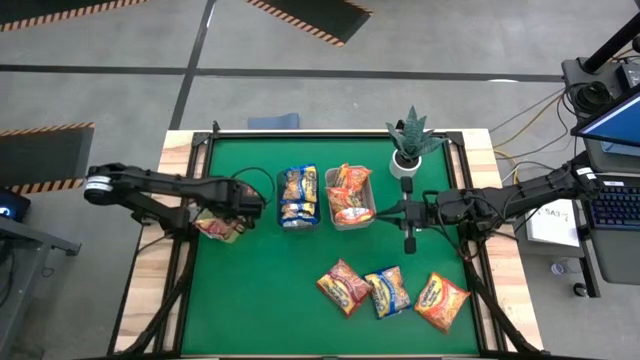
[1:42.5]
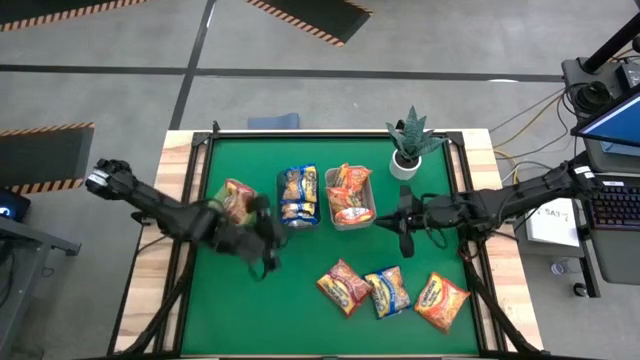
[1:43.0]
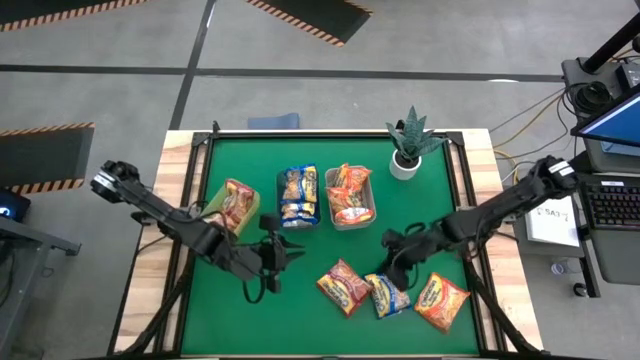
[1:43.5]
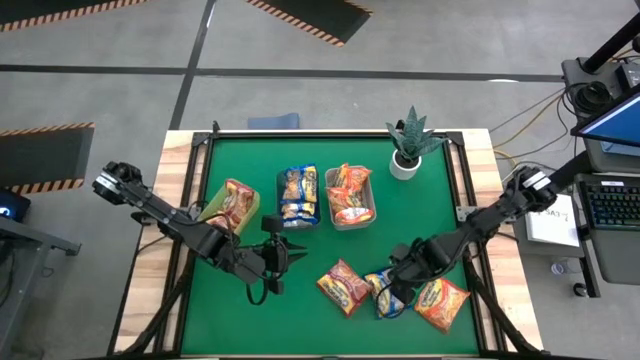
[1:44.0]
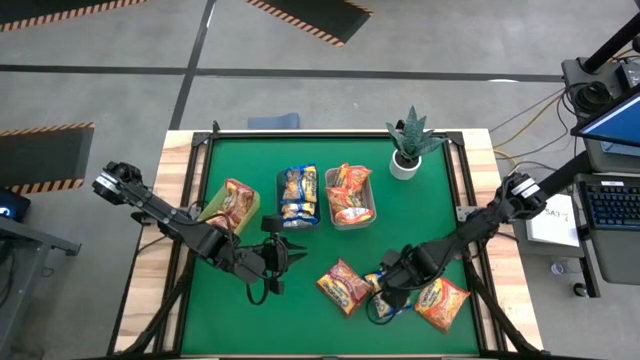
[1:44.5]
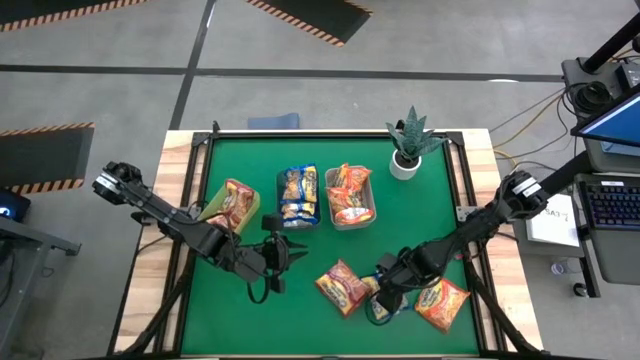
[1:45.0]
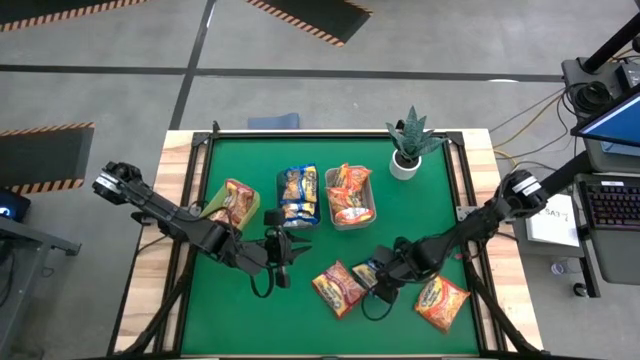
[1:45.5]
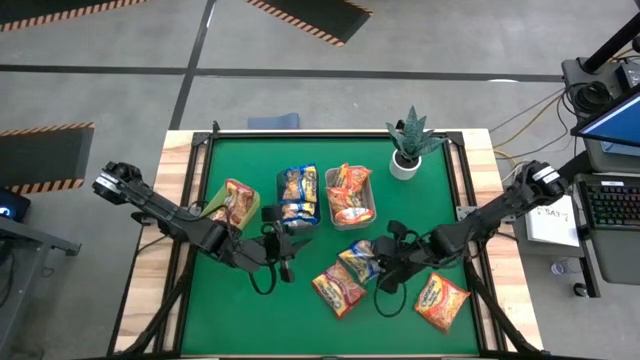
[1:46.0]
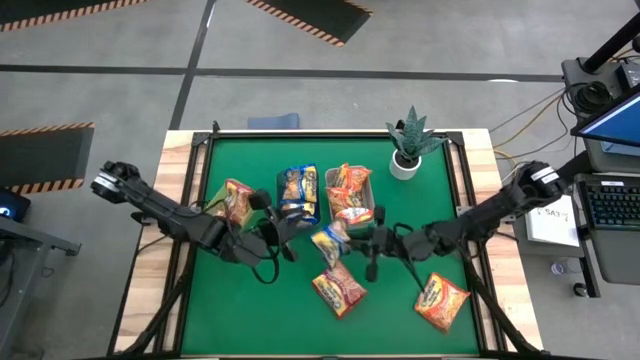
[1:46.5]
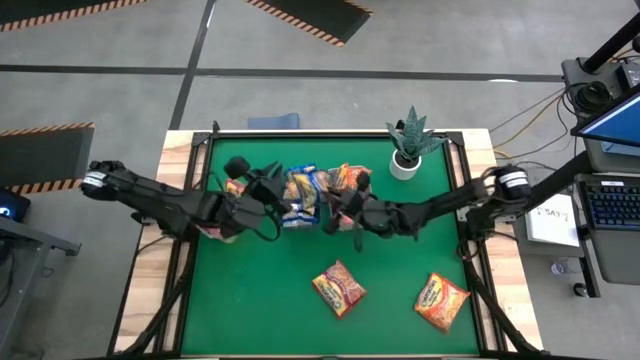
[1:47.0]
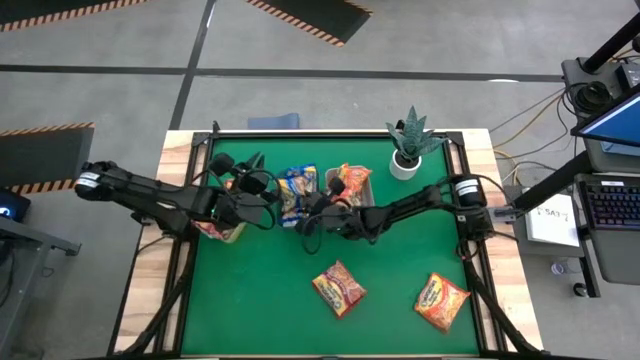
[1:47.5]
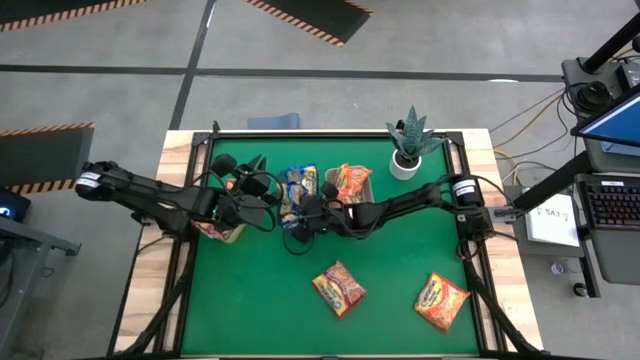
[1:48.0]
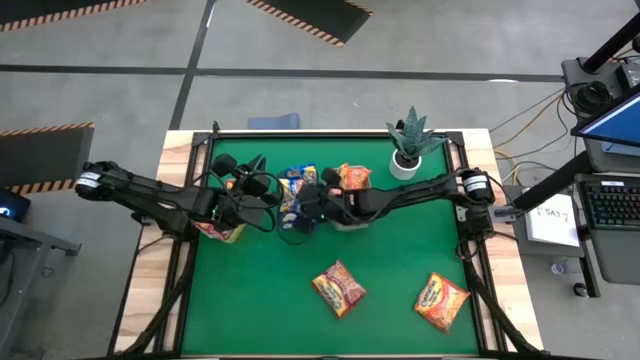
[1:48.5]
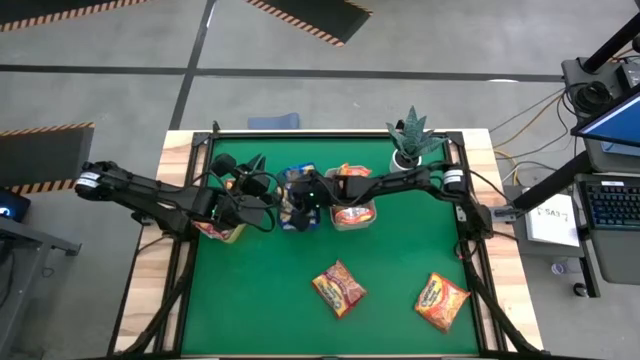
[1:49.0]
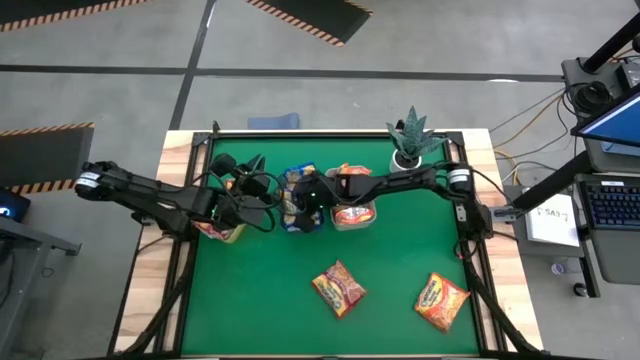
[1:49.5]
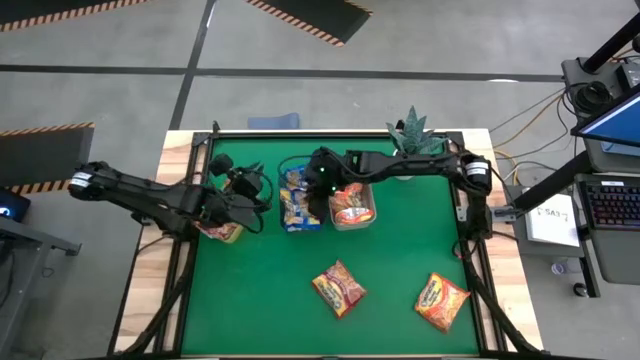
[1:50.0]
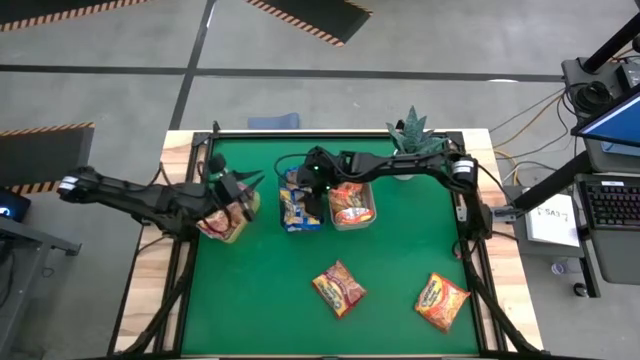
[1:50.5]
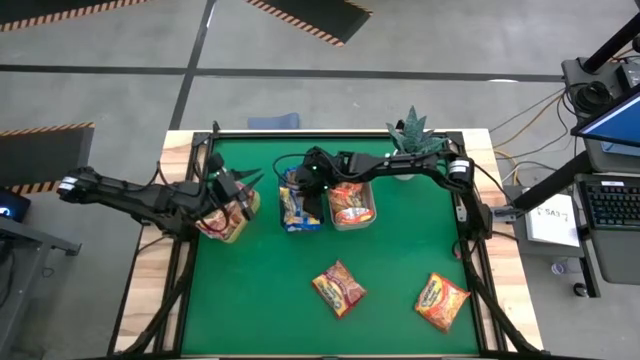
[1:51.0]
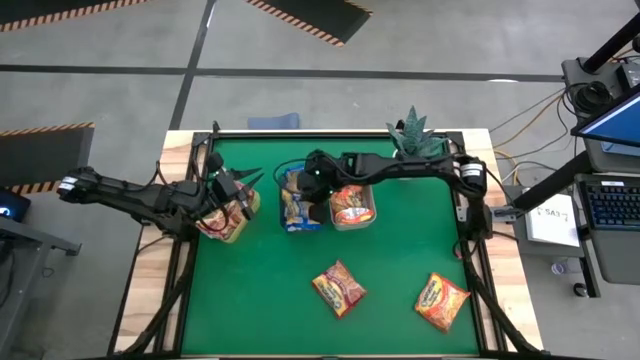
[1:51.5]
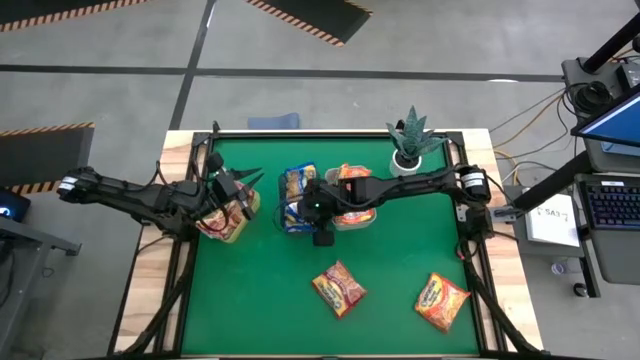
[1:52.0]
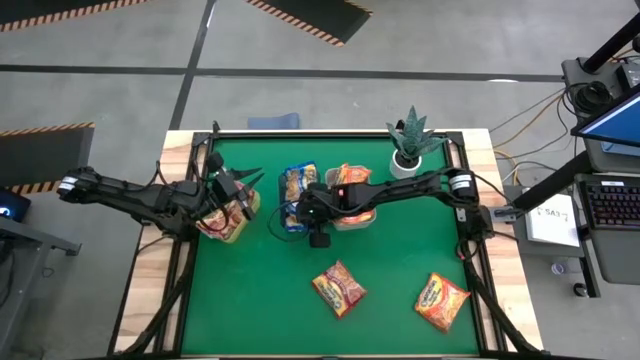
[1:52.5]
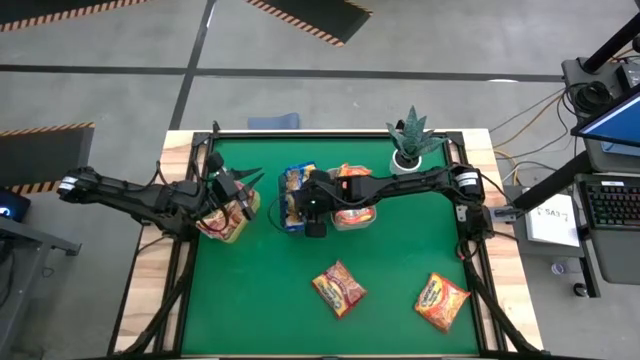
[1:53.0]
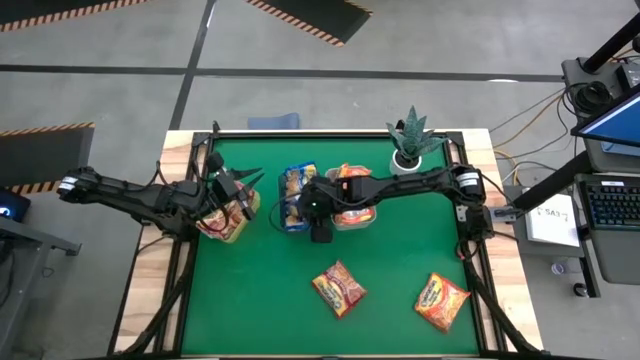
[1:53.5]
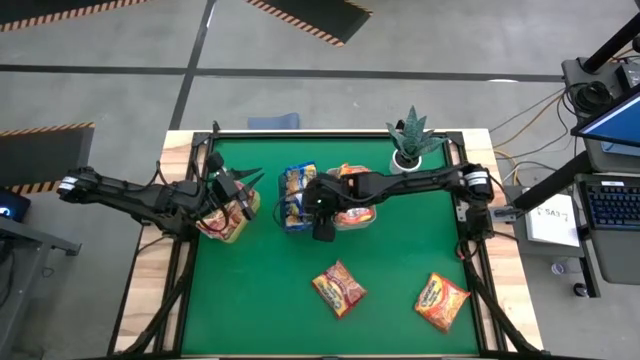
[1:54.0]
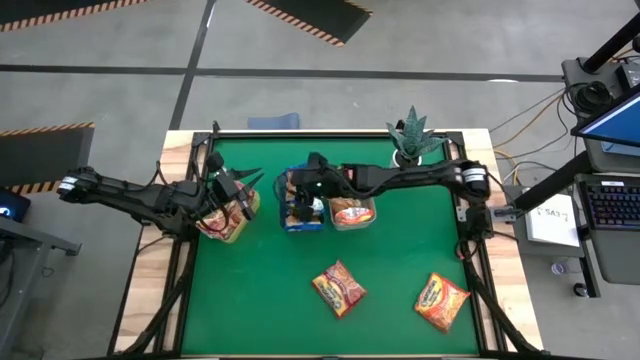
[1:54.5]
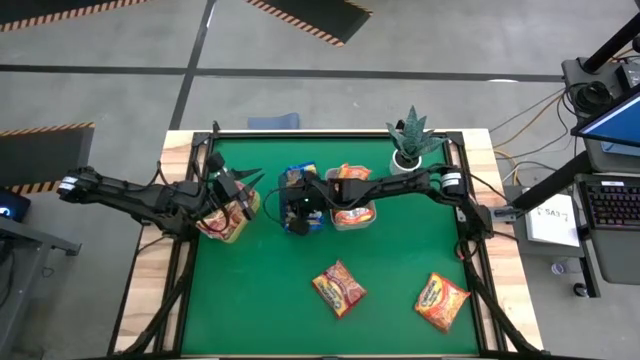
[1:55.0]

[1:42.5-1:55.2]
Task: Sort Maruchan noodles
Put the blue noodle pack into the black bin

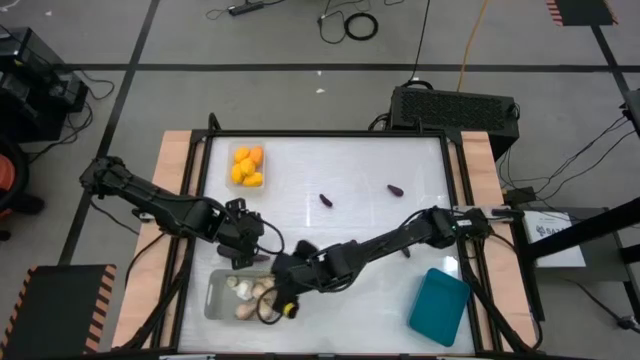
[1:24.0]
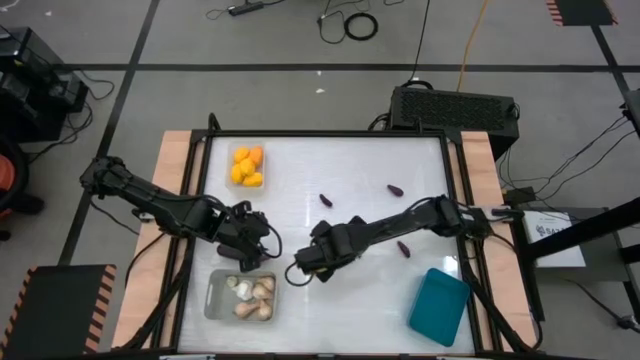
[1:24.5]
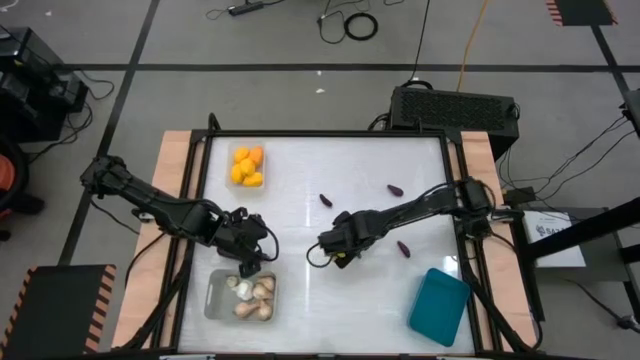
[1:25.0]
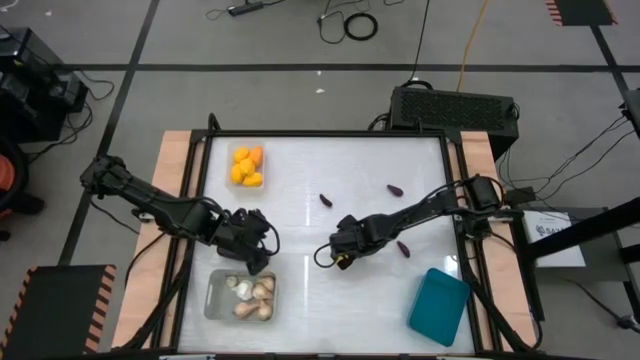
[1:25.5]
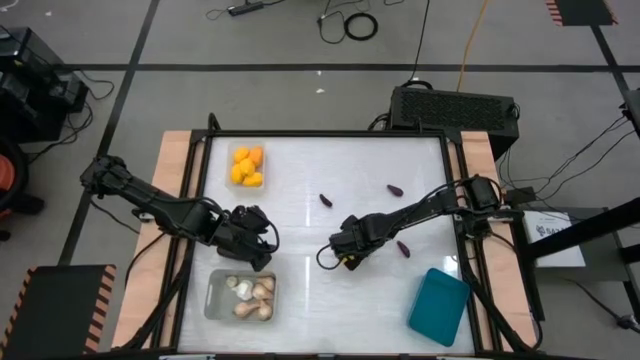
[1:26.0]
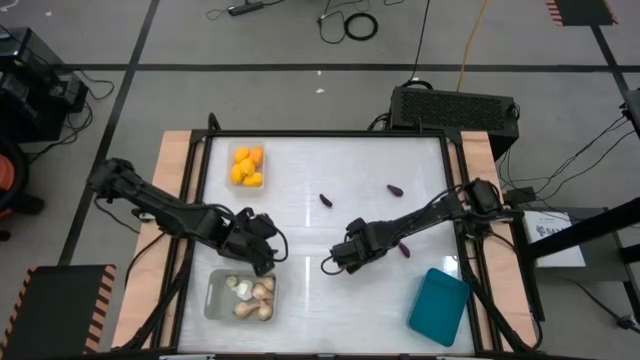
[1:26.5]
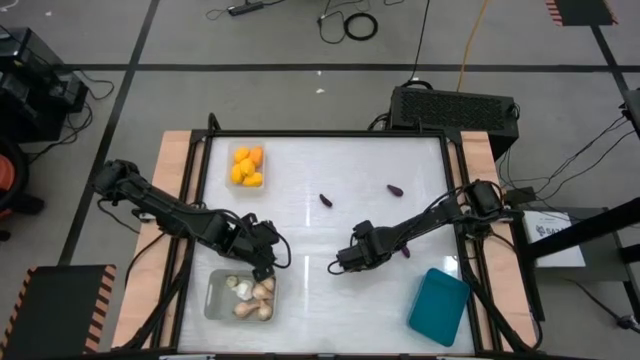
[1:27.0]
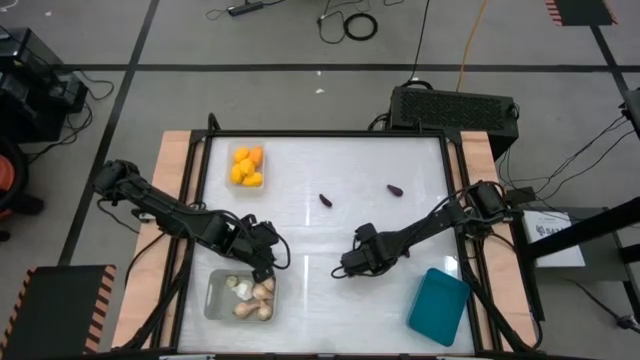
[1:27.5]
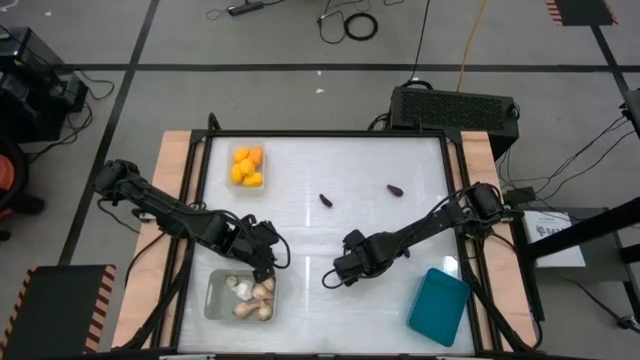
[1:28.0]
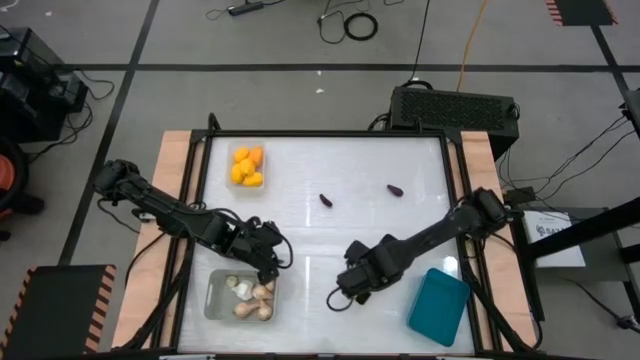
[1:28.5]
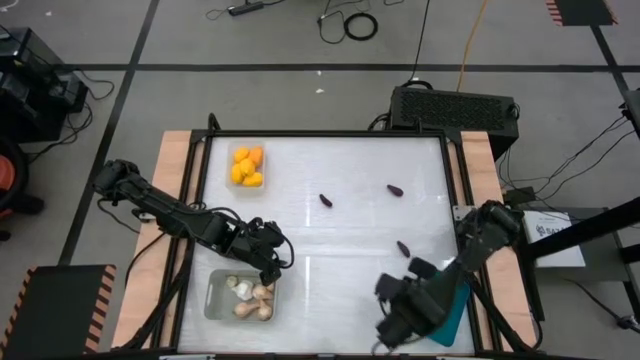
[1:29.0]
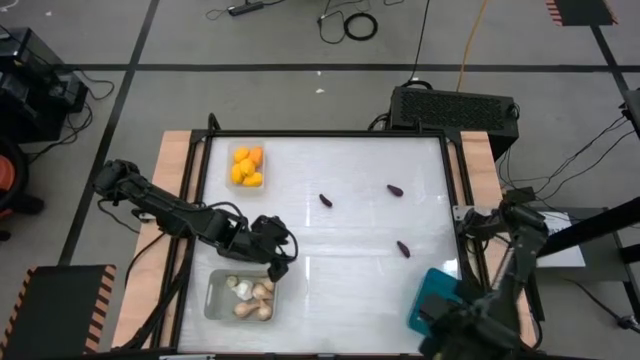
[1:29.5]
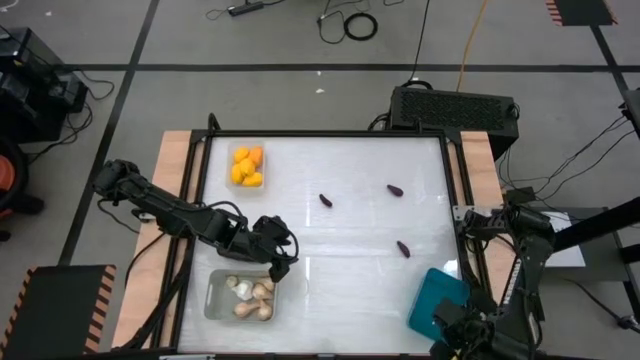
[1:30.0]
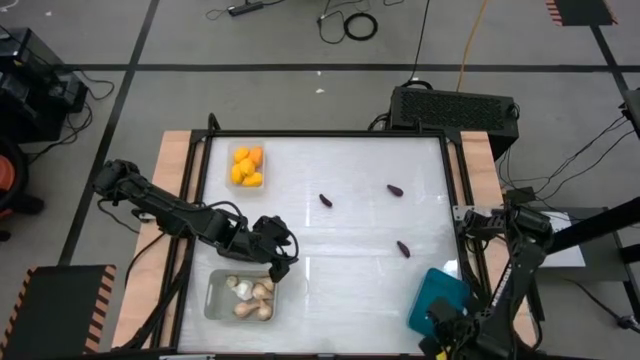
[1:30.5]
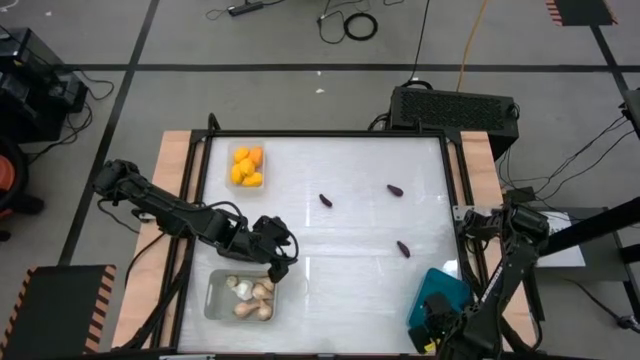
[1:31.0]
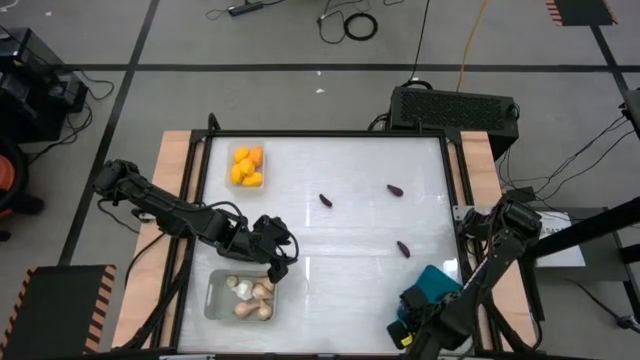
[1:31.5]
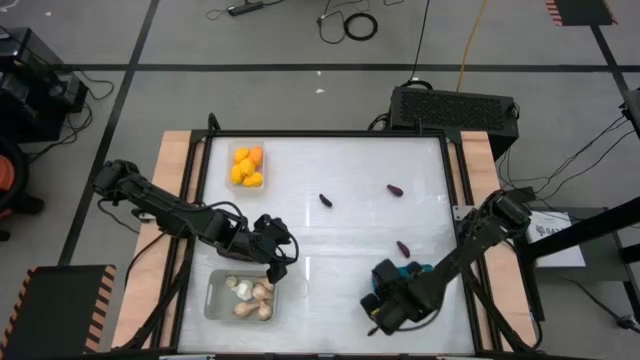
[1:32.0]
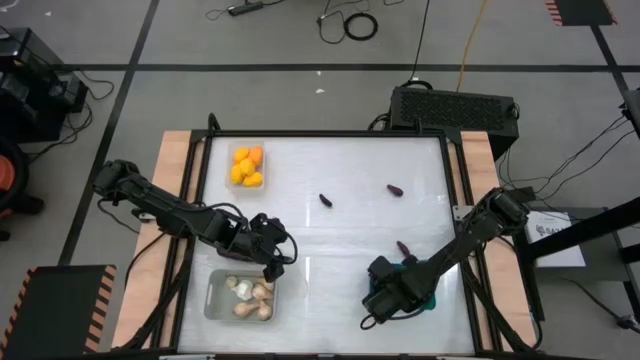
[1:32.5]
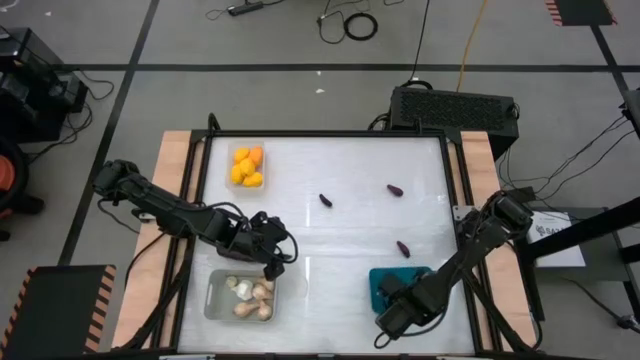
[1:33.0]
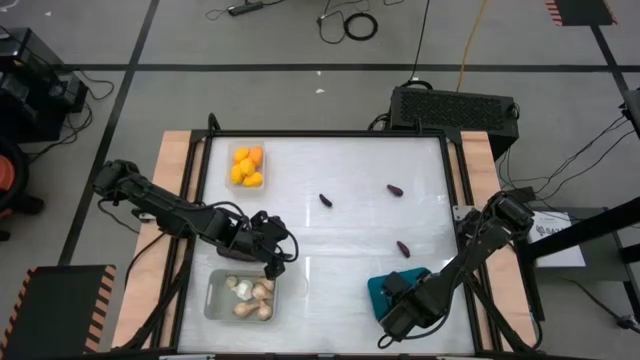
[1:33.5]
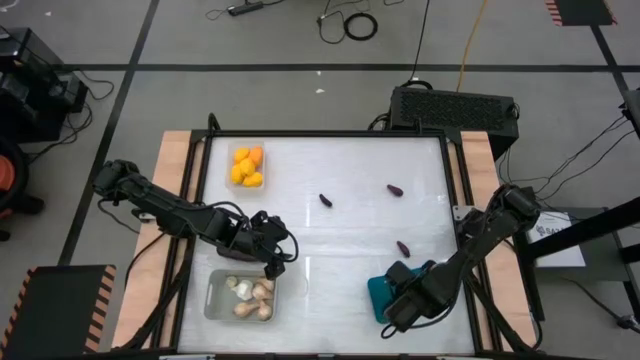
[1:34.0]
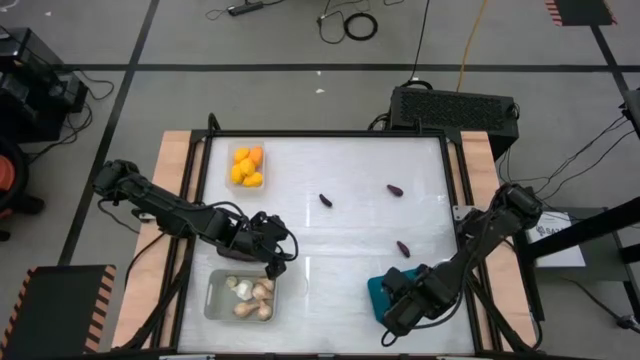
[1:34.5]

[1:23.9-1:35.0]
Task: Sort produce into baskets
Put the purple eggplant into the blue bin
